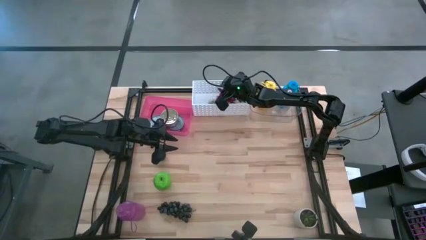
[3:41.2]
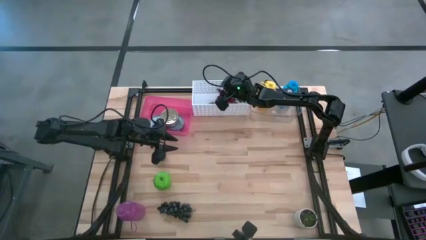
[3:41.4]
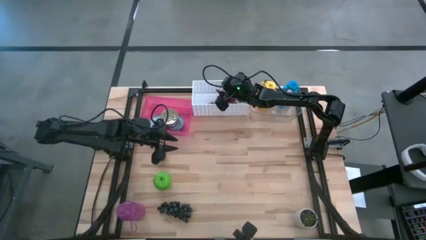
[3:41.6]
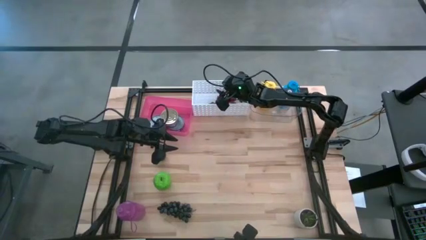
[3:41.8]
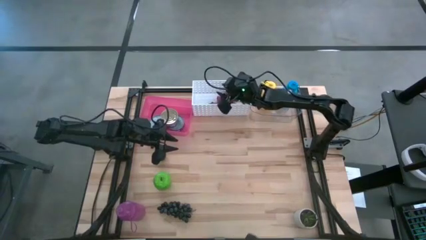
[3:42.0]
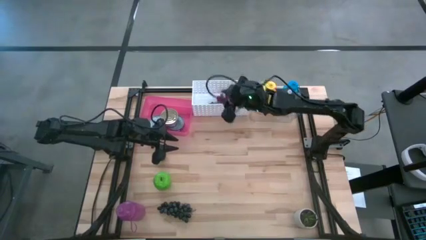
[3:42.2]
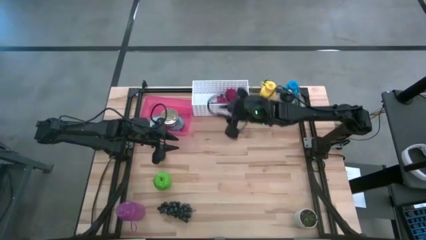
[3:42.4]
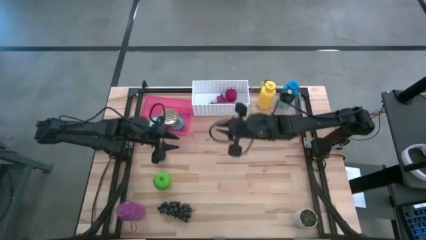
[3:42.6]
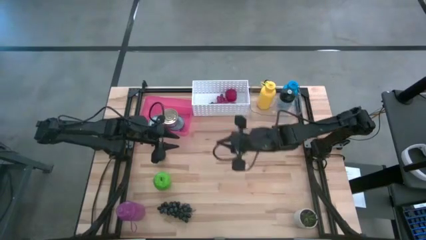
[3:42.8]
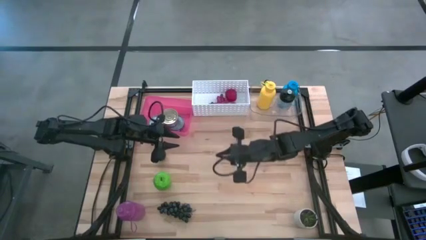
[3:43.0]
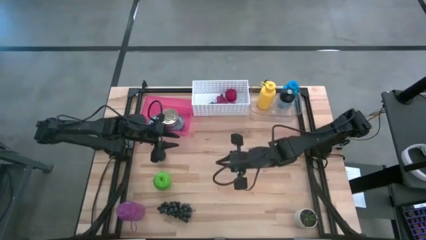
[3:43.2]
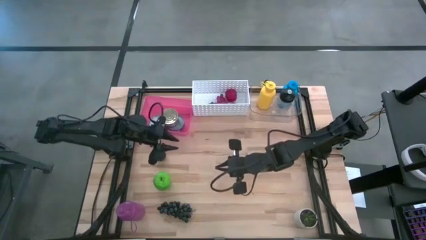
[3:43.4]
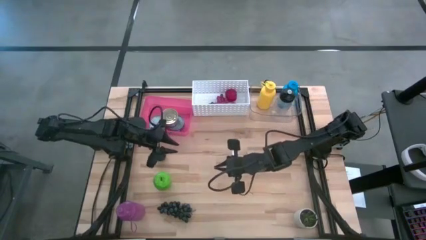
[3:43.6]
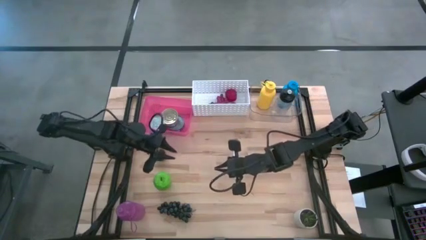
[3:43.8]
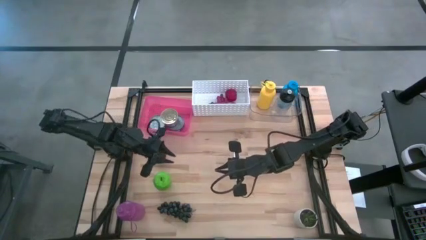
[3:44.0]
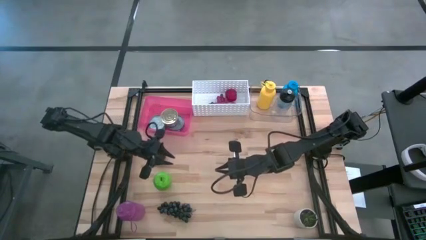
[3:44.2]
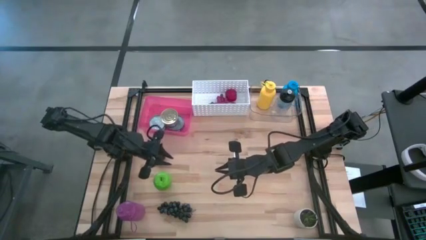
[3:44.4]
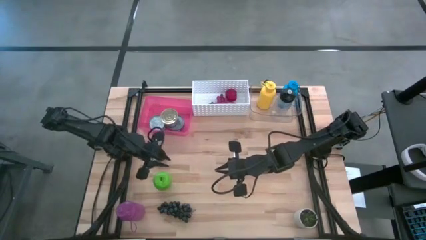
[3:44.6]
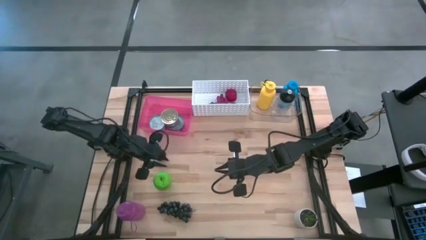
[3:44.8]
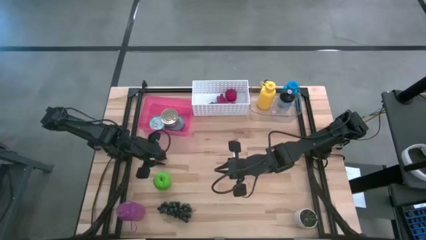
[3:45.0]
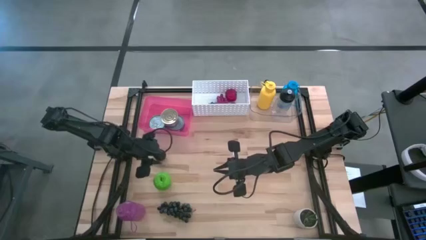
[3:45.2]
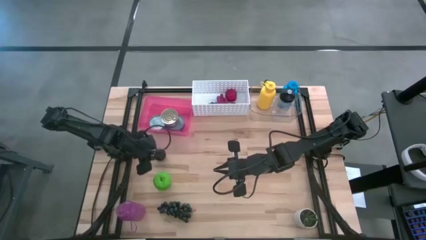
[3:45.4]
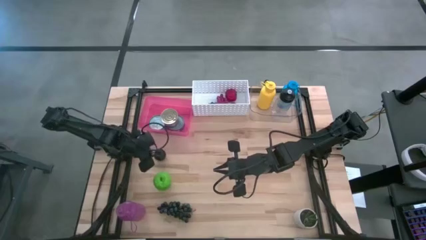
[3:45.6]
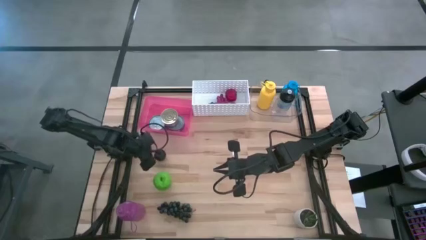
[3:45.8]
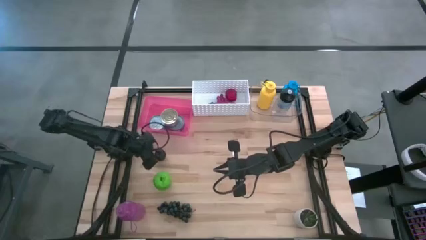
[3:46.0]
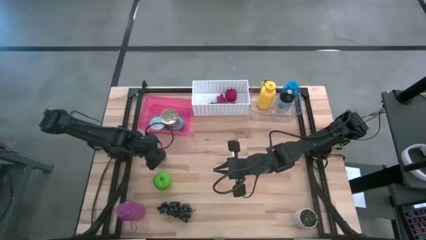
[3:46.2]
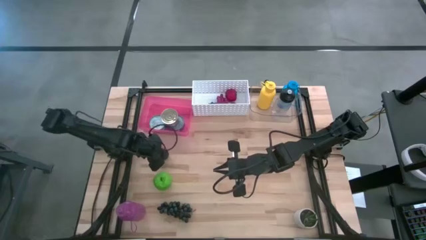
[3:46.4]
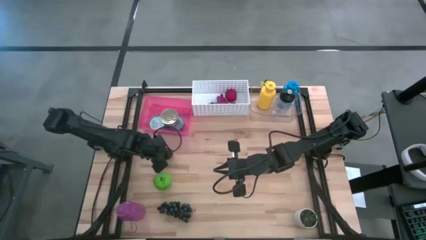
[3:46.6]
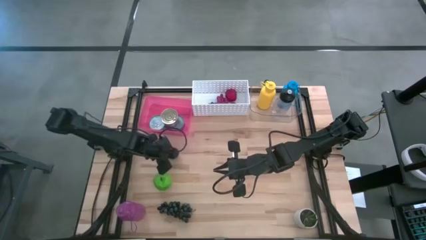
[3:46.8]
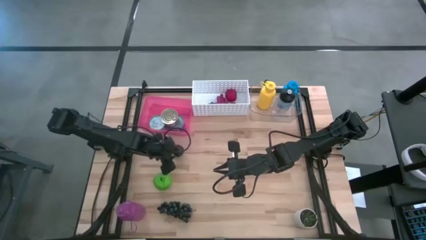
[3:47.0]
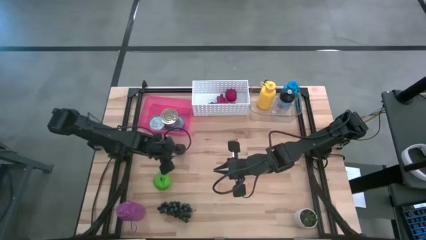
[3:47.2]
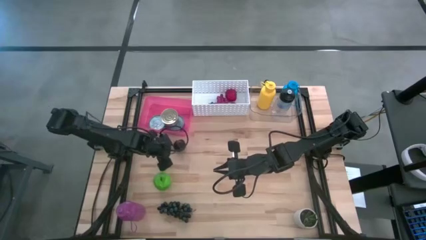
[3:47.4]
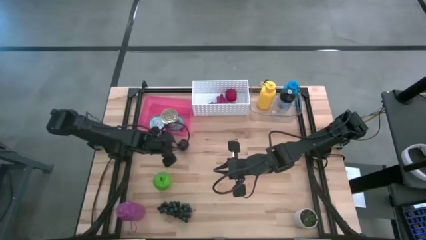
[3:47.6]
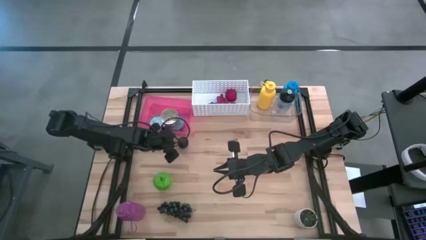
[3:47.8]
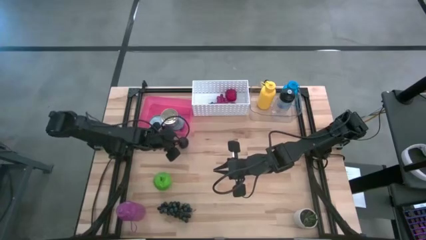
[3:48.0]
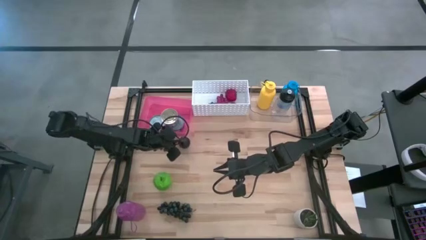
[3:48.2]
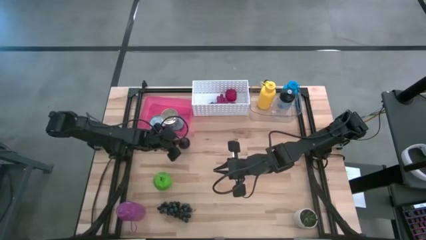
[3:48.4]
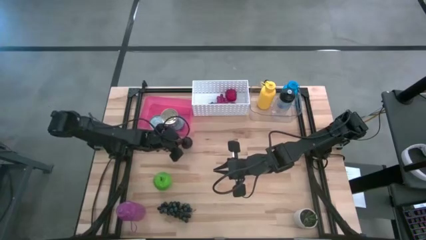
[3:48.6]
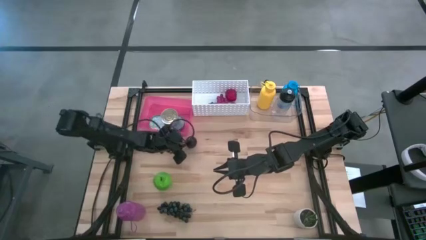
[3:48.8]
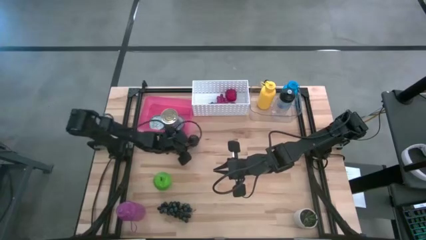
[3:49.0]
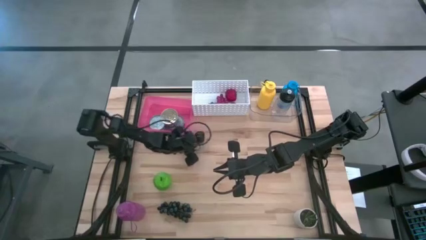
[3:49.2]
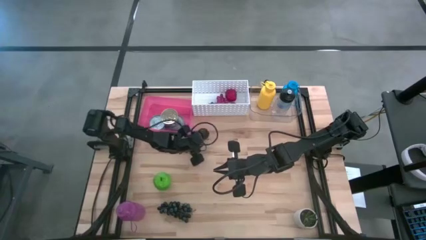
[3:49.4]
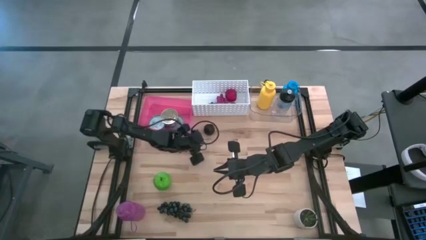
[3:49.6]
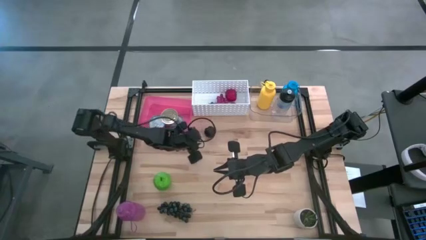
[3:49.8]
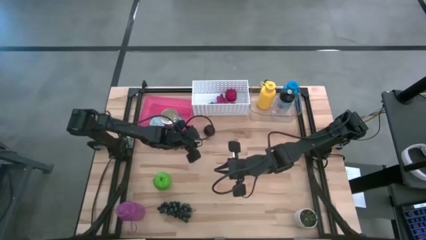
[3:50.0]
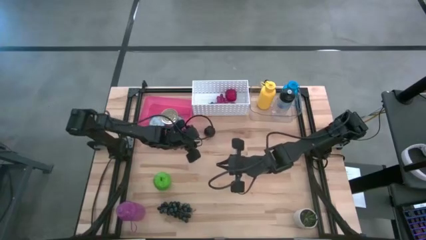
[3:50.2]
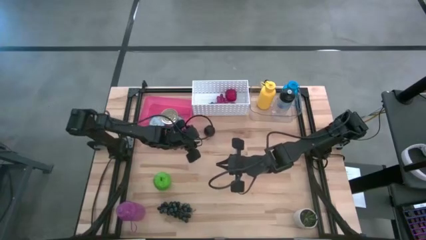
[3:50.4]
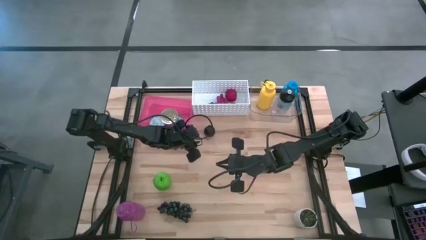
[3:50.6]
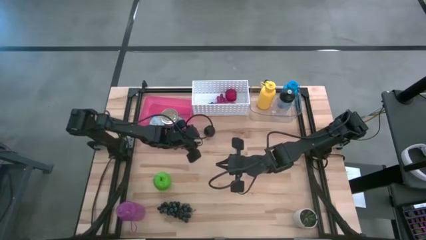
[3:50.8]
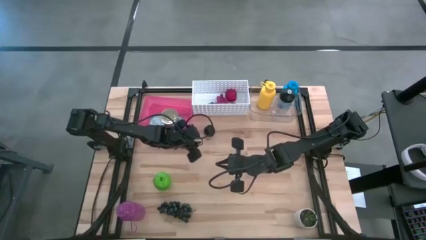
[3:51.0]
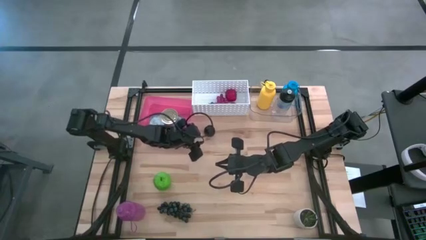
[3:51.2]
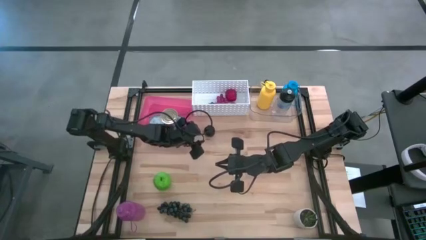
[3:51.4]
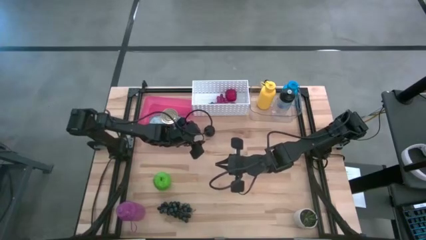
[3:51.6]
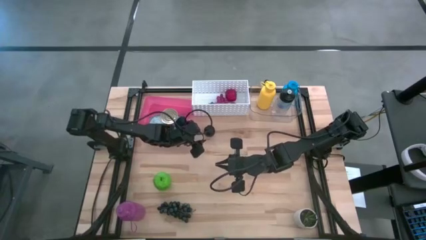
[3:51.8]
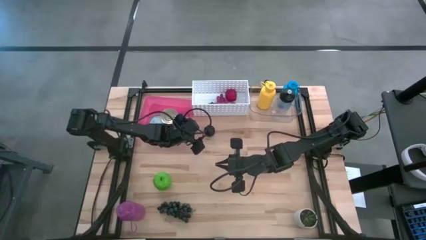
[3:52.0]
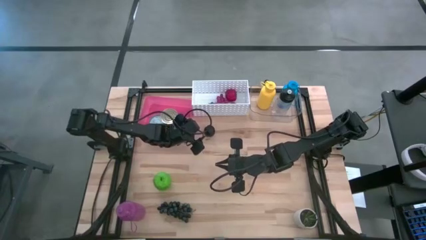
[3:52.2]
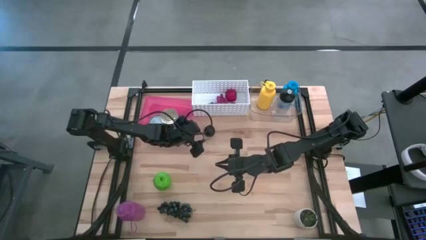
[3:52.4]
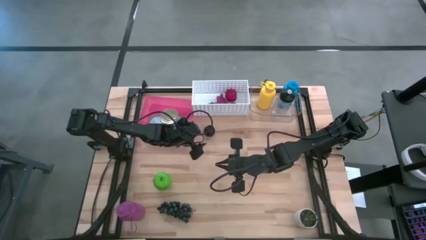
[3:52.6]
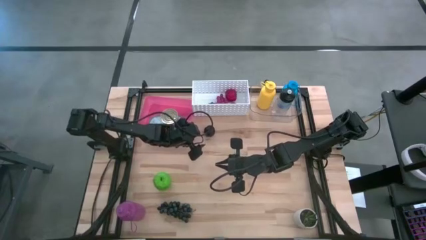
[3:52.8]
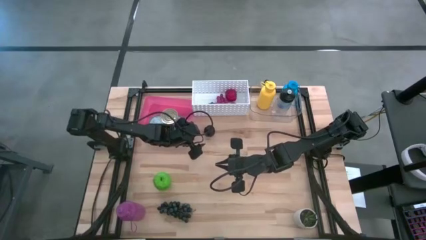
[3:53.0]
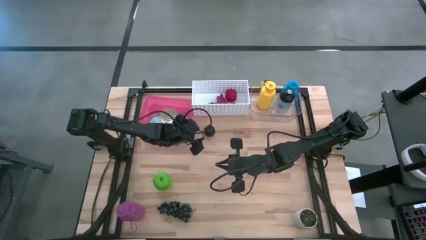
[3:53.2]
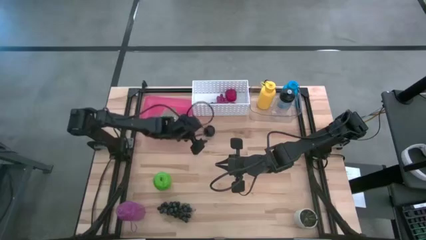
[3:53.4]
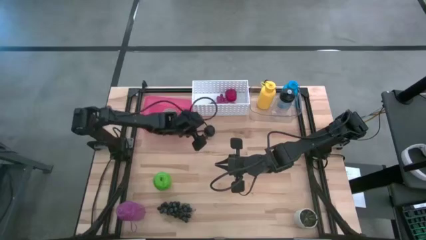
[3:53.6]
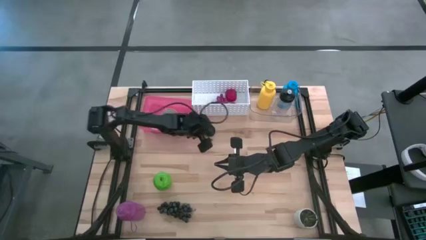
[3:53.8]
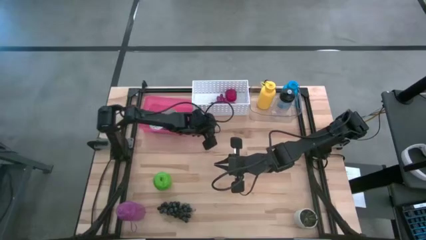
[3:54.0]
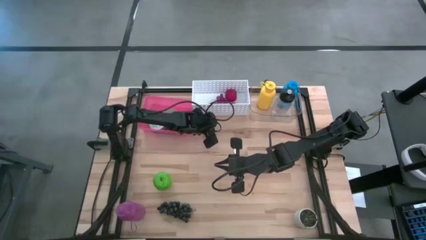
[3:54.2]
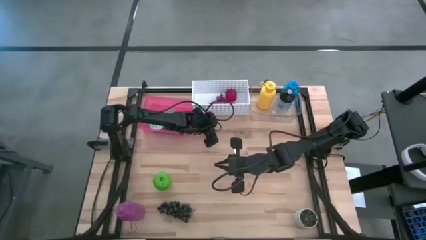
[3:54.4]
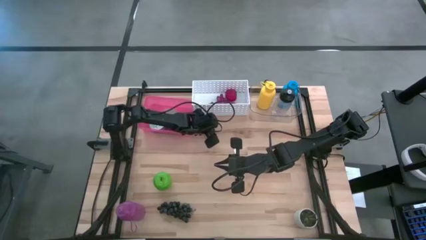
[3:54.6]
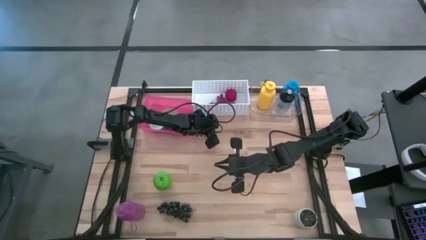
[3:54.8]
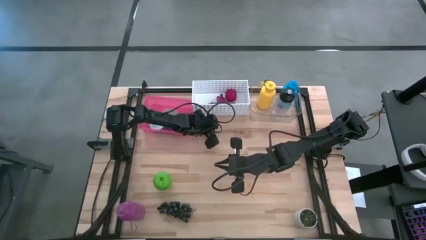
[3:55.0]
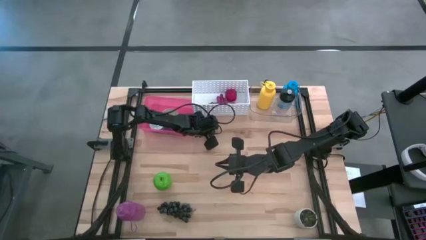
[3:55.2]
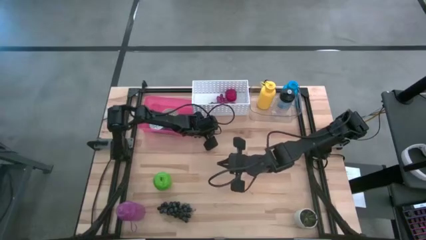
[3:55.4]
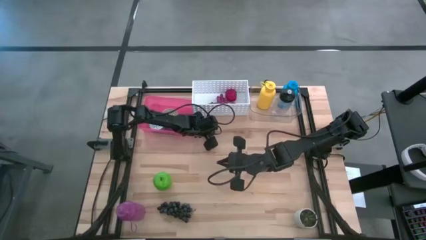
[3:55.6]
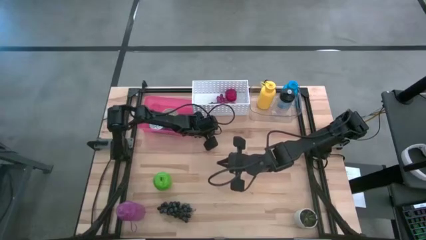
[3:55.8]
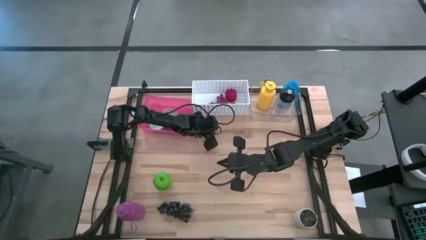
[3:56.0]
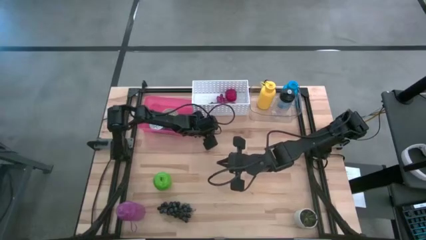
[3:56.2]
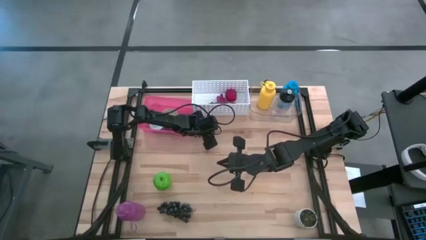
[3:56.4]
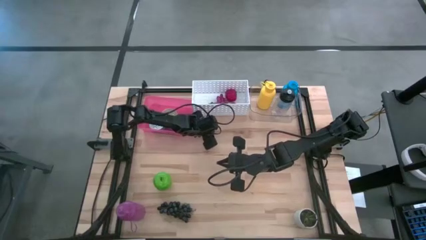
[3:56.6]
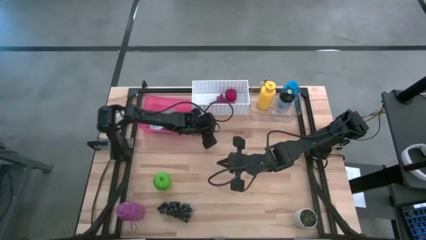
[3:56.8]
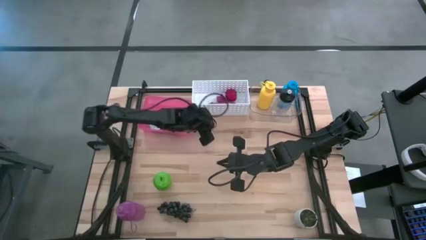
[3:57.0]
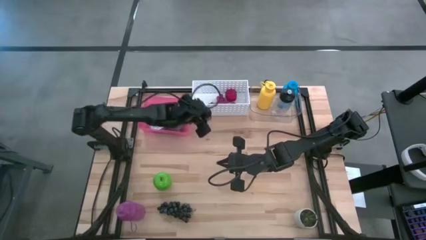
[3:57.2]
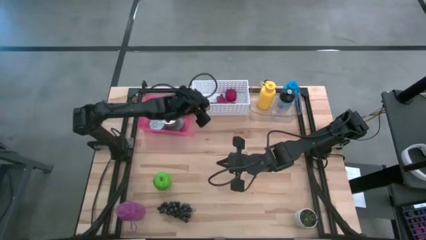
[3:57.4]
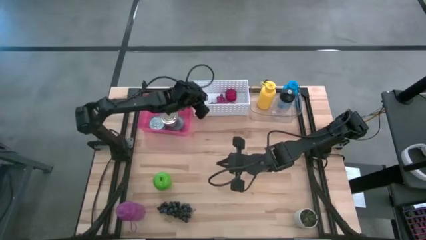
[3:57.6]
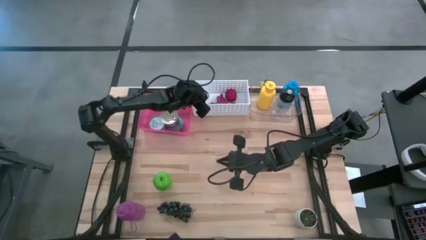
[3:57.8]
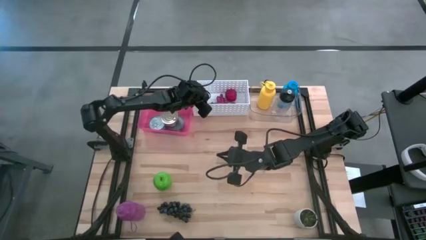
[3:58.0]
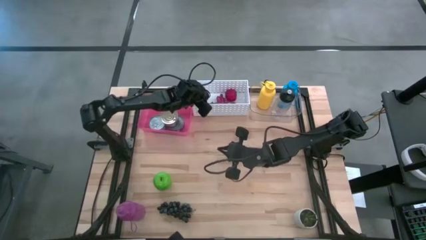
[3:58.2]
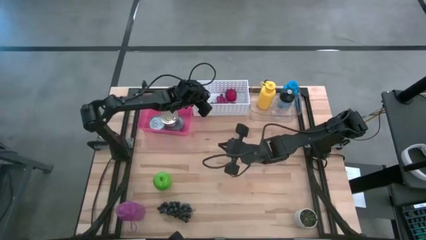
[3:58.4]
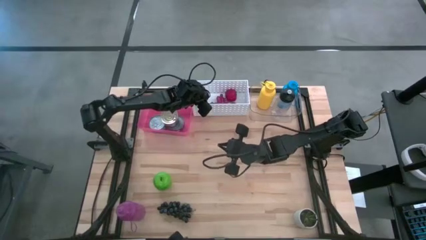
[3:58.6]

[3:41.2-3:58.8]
Task: Pick & Place Food Item
Put the black plum into the white bin
